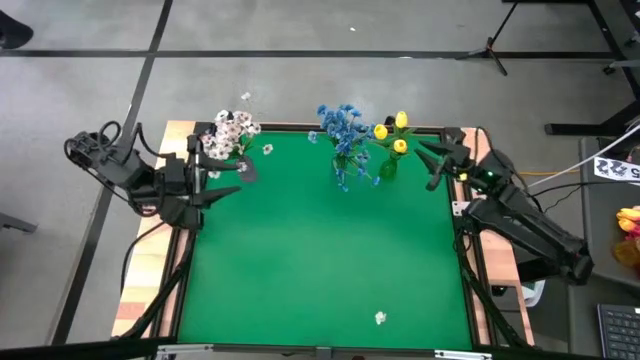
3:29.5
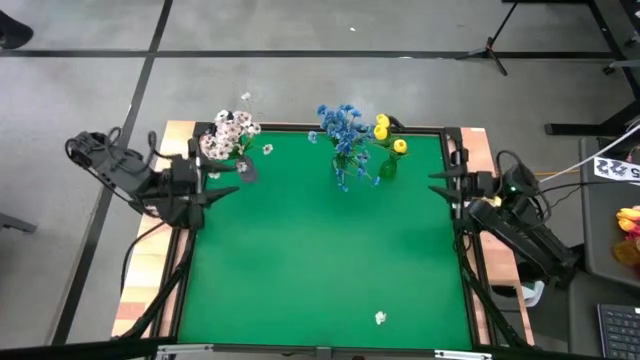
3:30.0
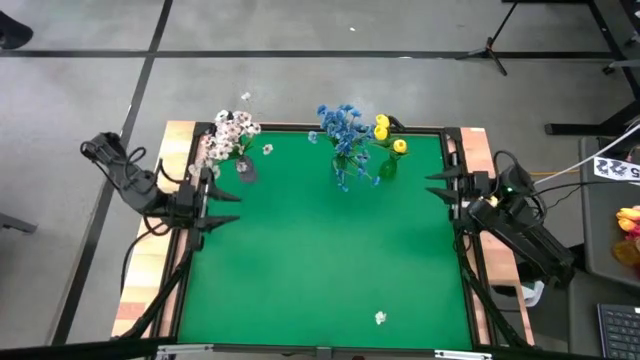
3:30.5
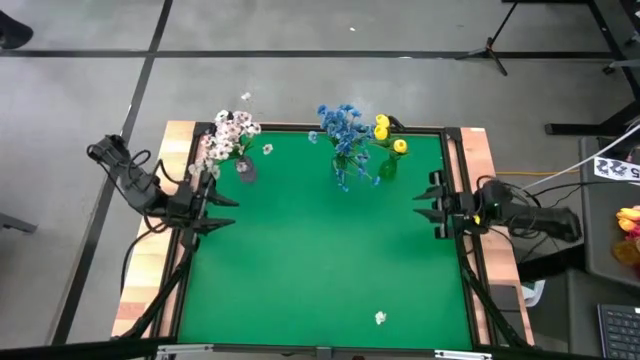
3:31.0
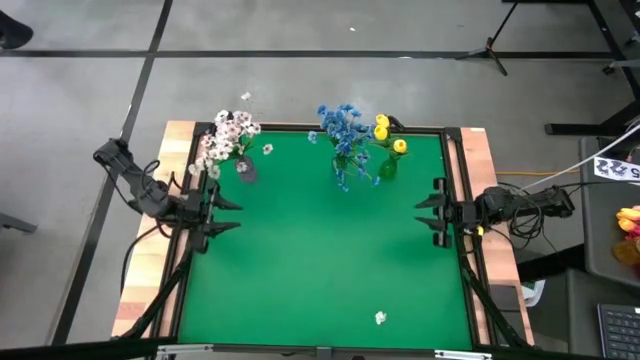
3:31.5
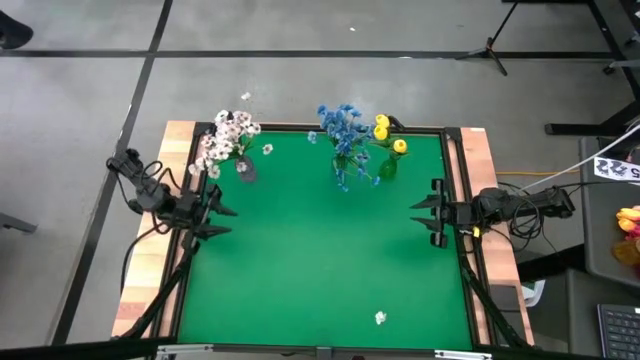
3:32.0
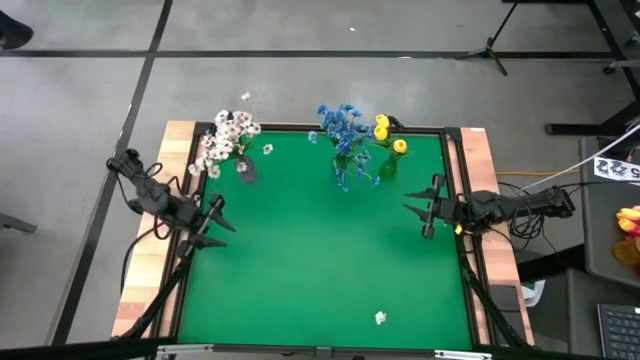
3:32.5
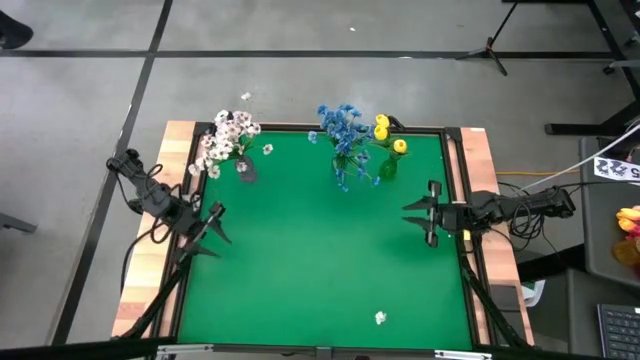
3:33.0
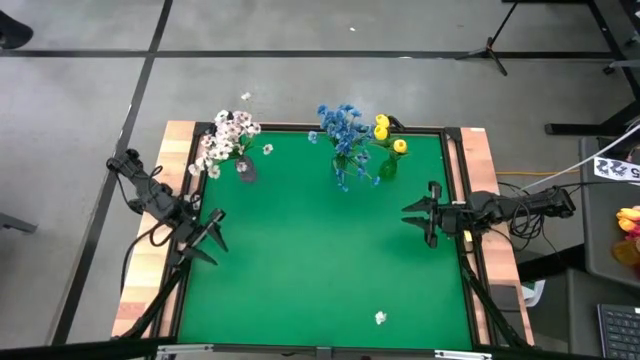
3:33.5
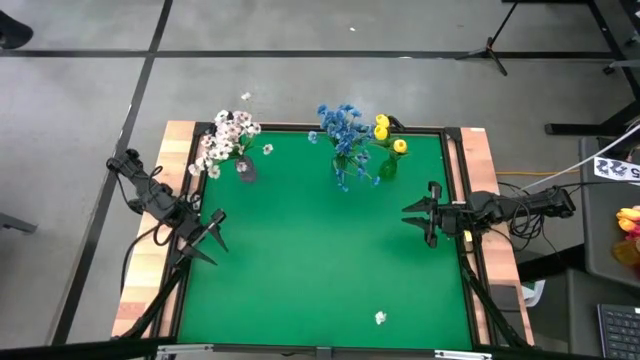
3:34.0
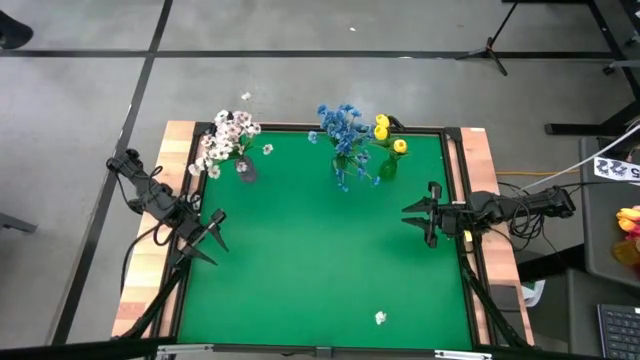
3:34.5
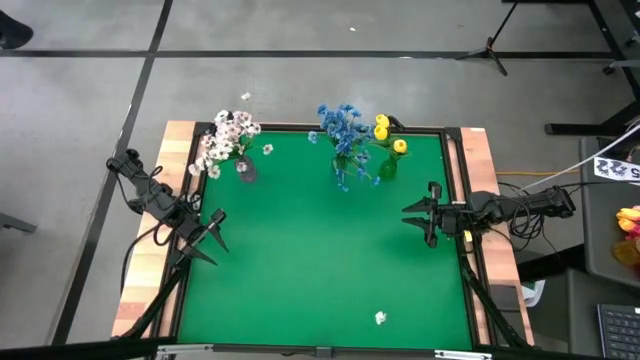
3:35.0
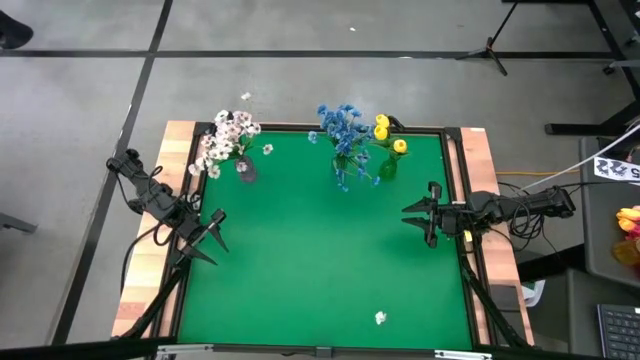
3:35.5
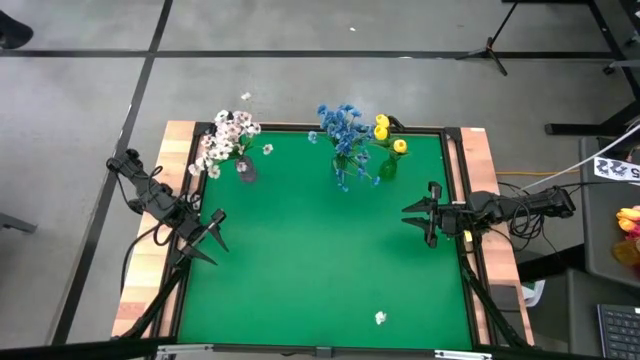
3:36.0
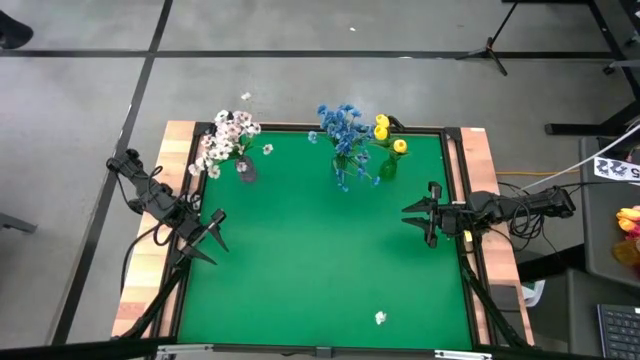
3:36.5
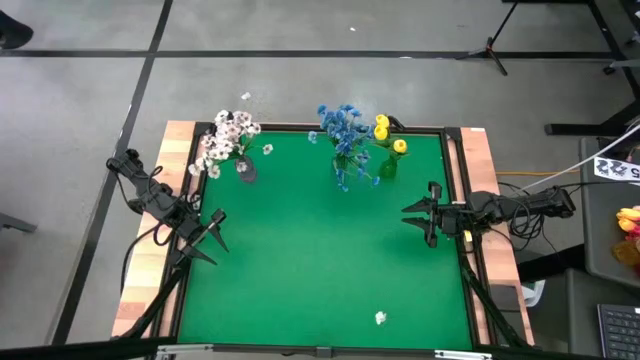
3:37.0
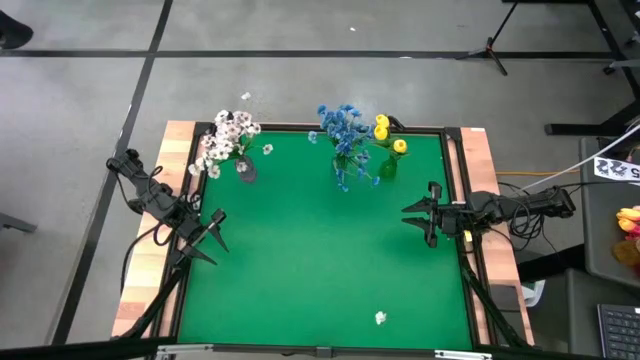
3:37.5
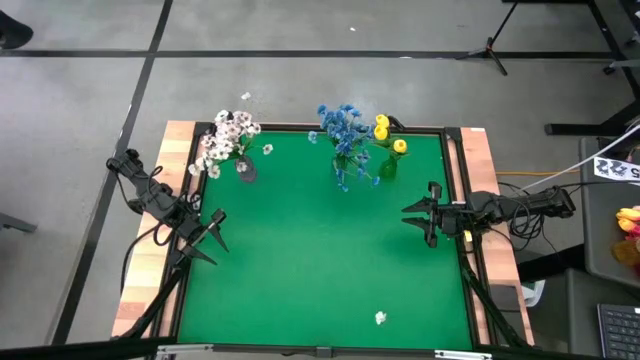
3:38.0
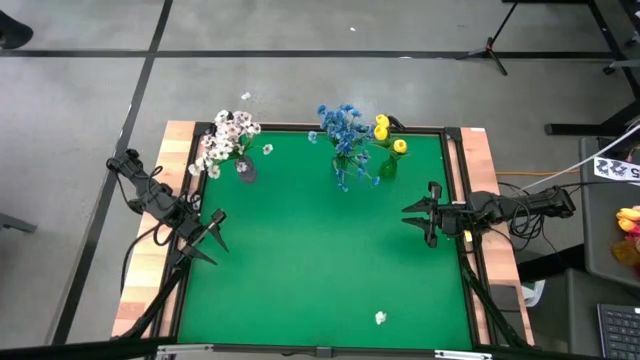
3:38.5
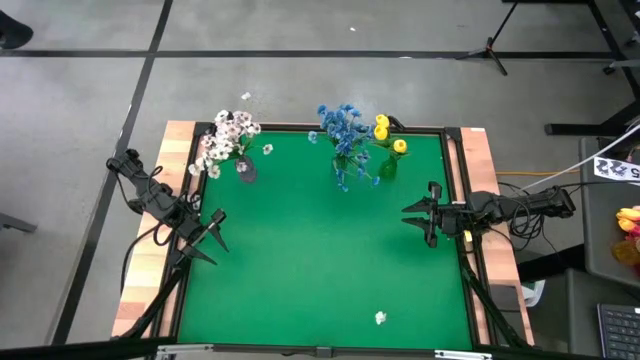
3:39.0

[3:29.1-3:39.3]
Task: Sort flowers into vase by color
Return to Home Position

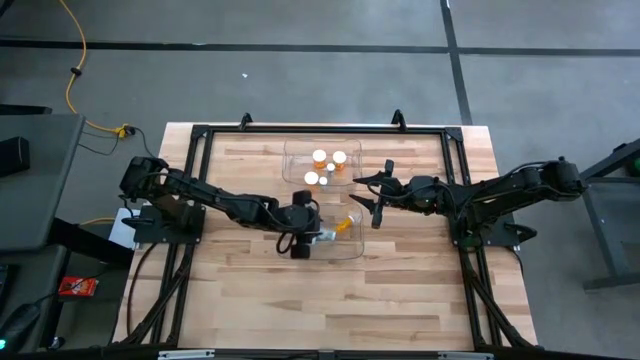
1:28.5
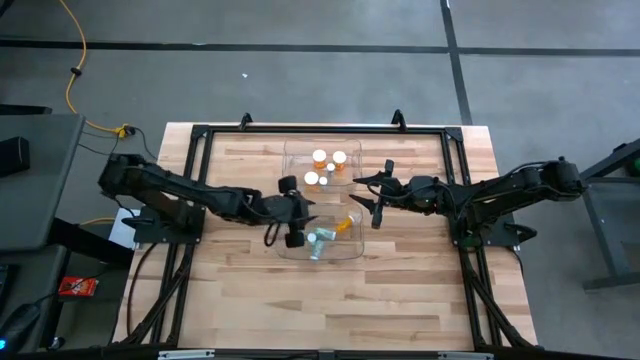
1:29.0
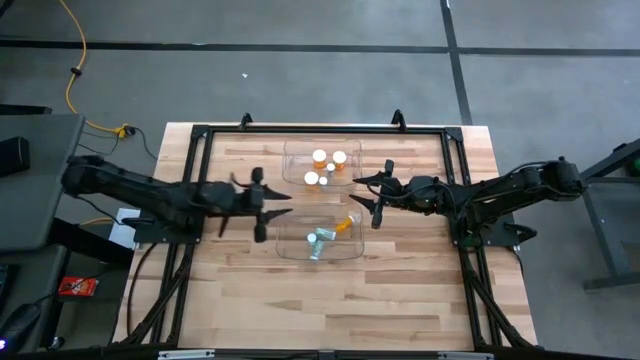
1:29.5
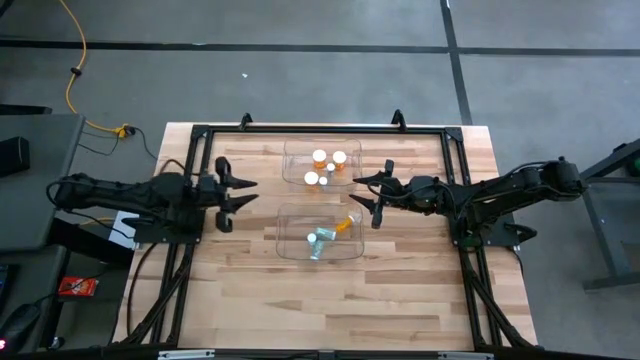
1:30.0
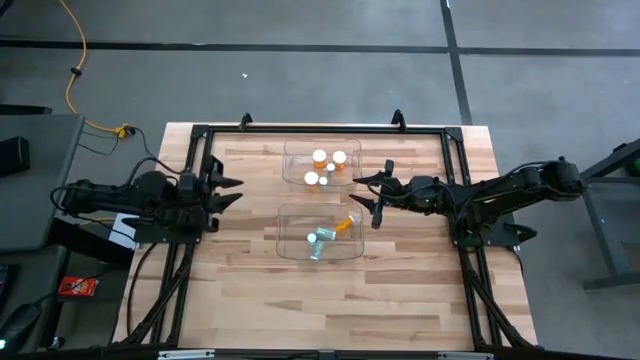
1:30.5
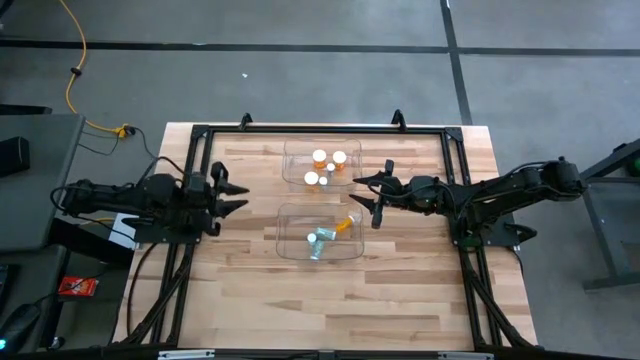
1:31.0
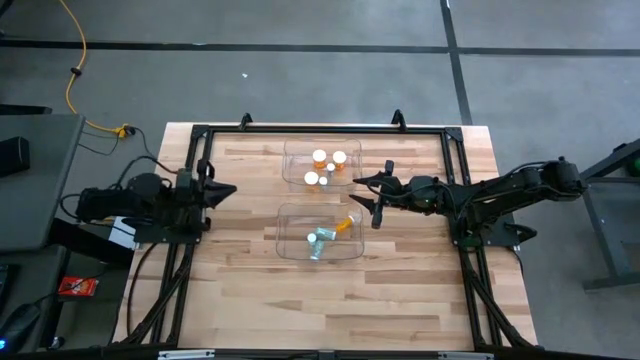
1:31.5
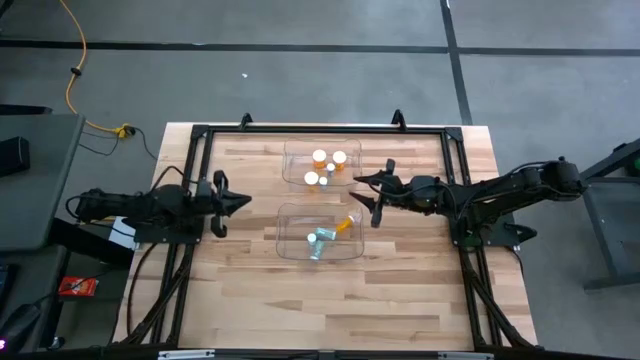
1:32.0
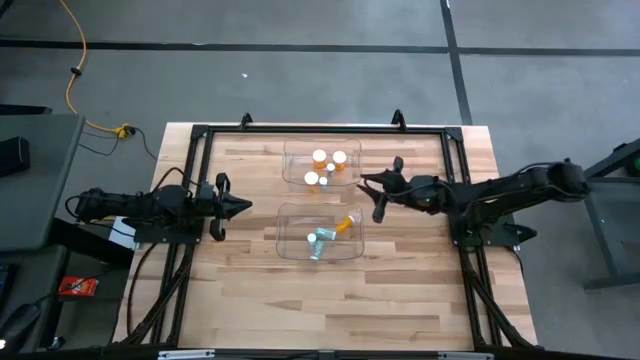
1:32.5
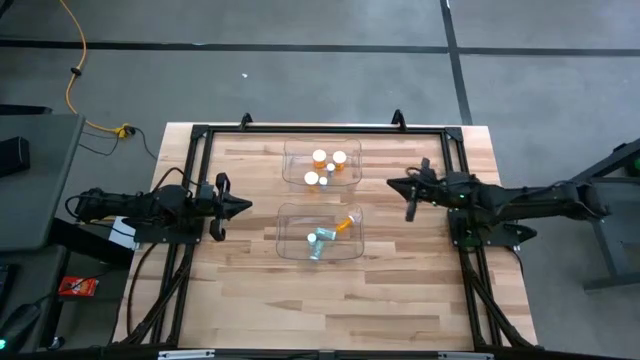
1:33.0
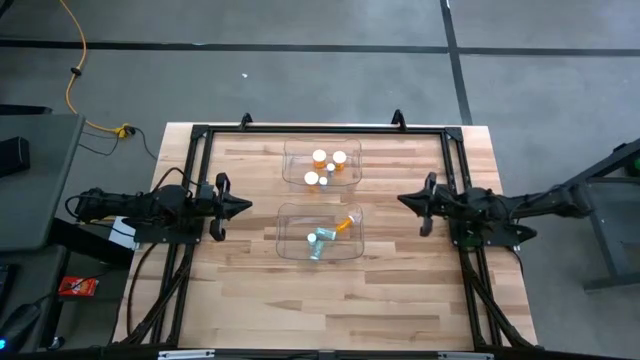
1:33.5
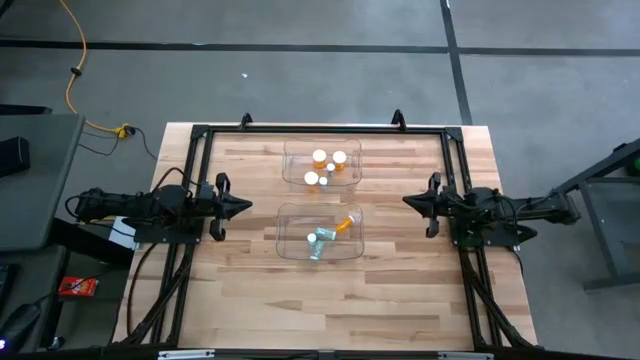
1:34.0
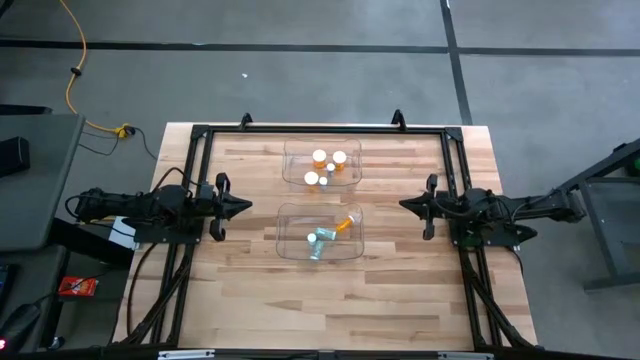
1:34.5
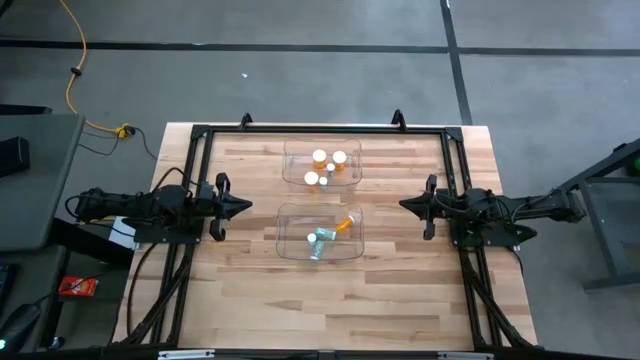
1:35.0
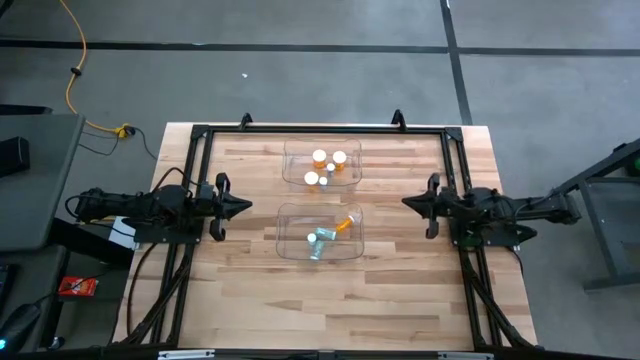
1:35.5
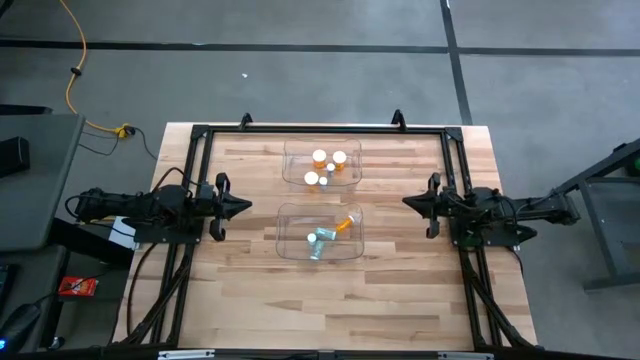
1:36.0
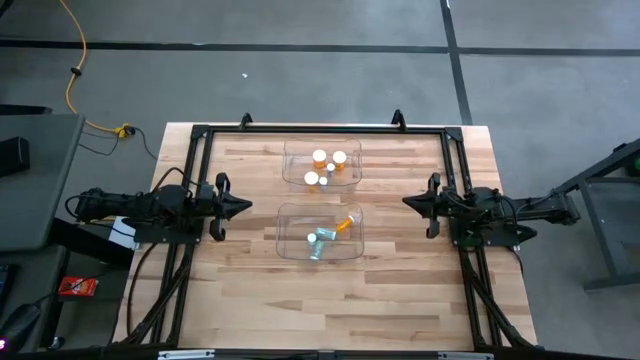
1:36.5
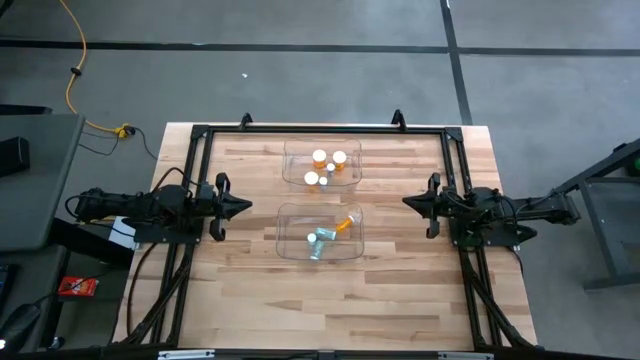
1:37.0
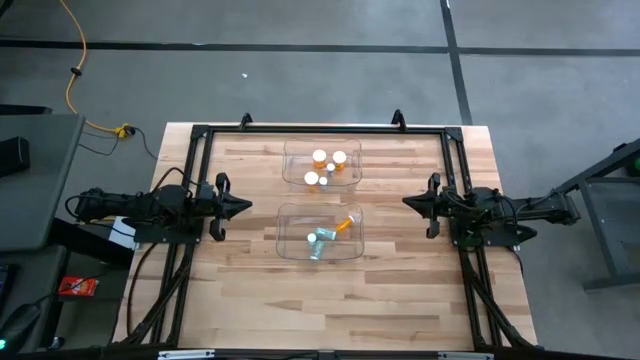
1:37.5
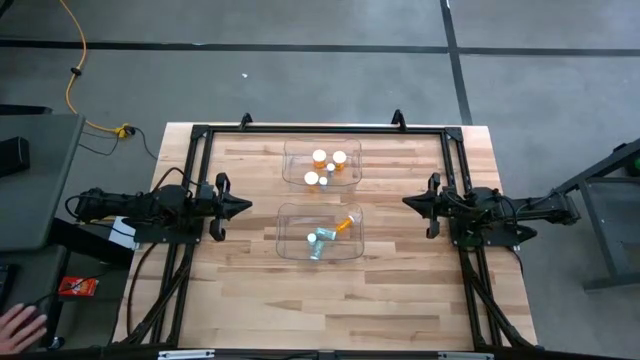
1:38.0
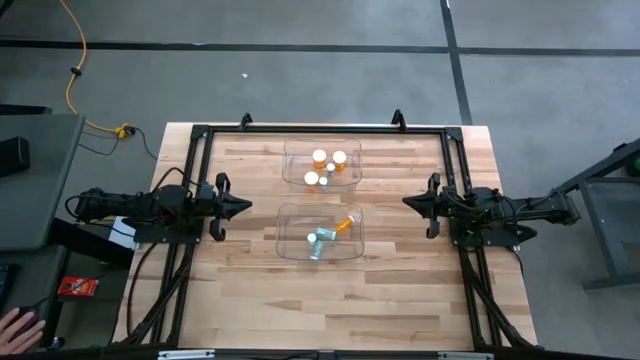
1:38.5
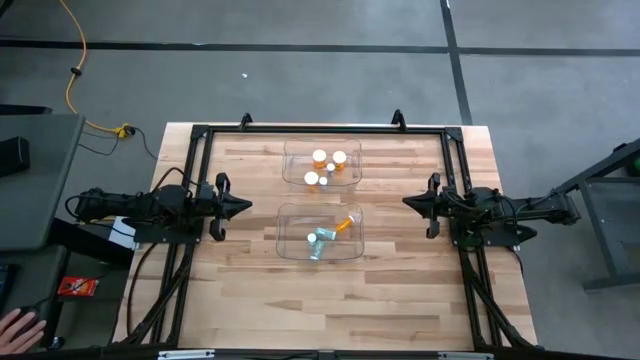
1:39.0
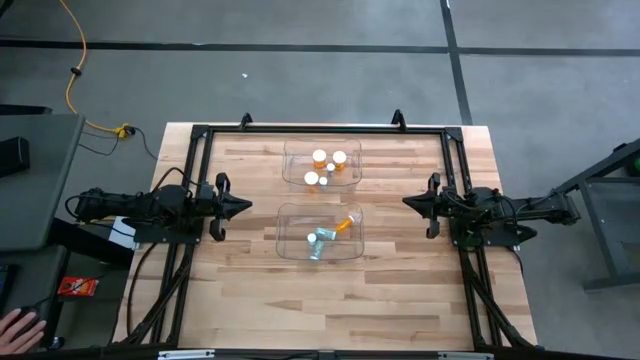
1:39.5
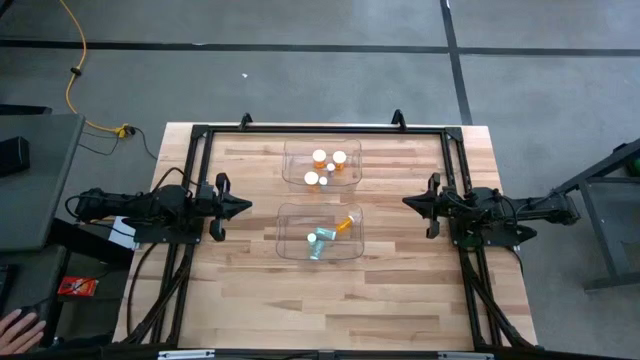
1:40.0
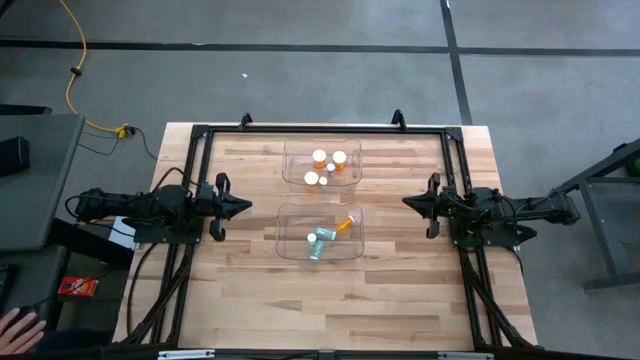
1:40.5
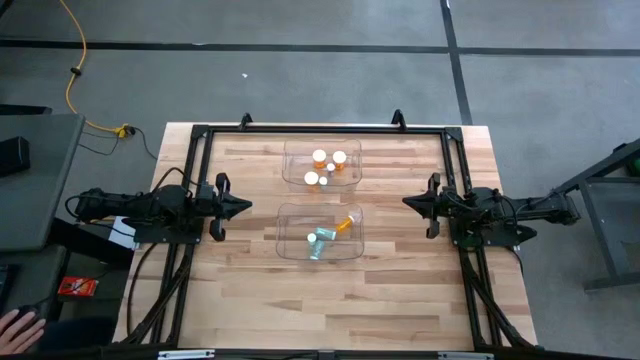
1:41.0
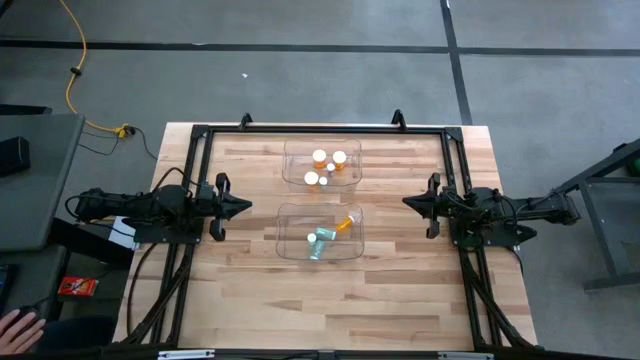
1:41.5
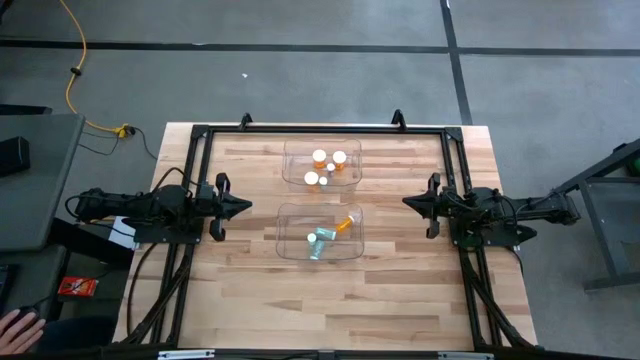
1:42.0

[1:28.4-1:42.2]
Task: Pick and place medicine bottles into bin by pill shape (circle, oval)
Return to Home Position
